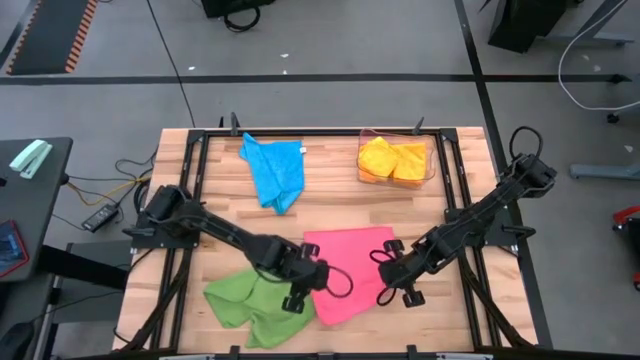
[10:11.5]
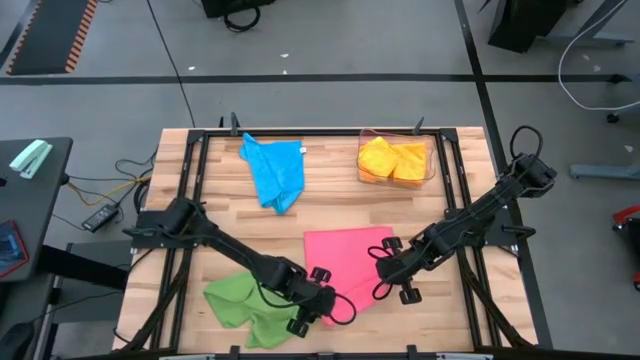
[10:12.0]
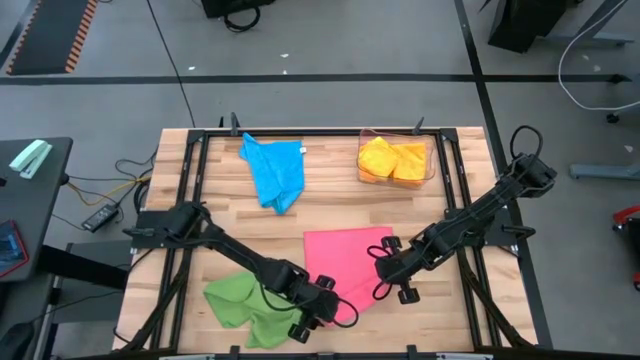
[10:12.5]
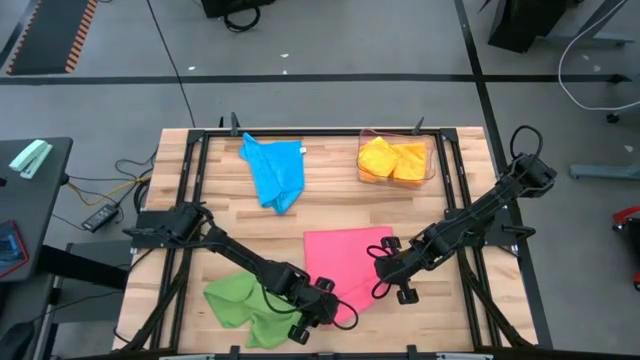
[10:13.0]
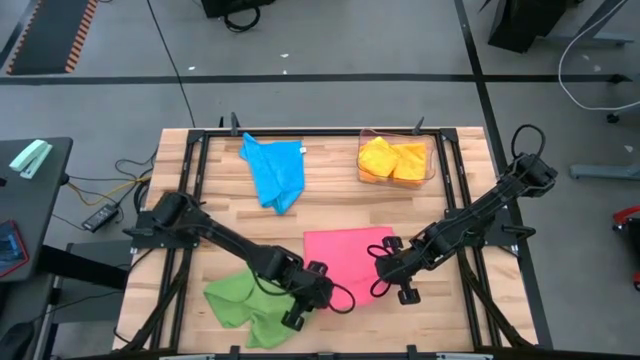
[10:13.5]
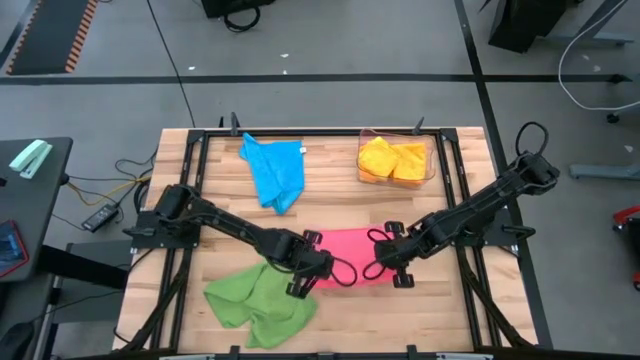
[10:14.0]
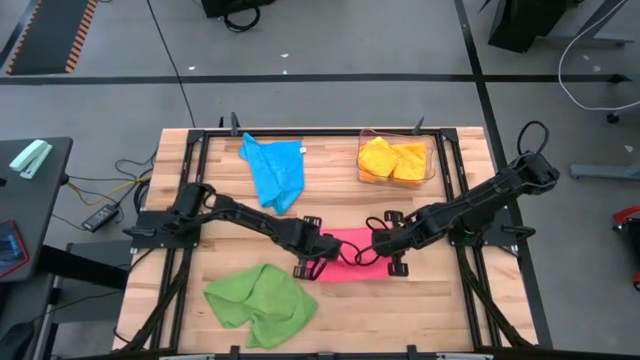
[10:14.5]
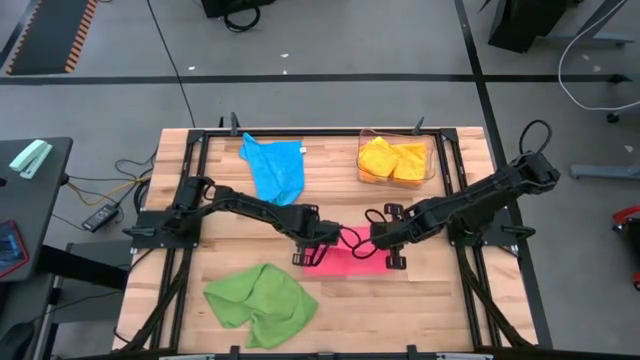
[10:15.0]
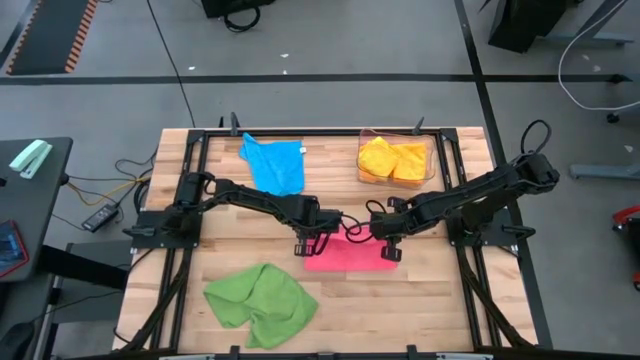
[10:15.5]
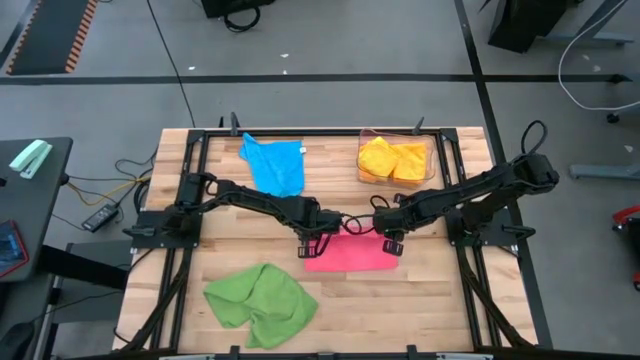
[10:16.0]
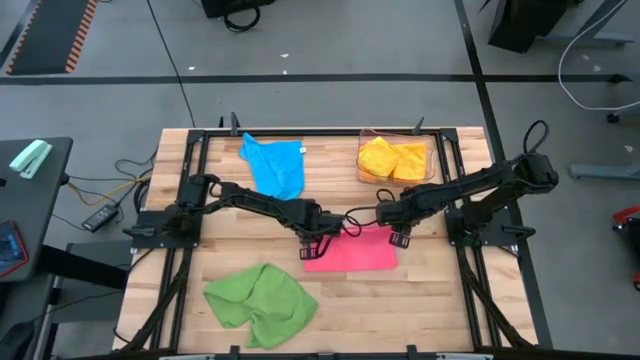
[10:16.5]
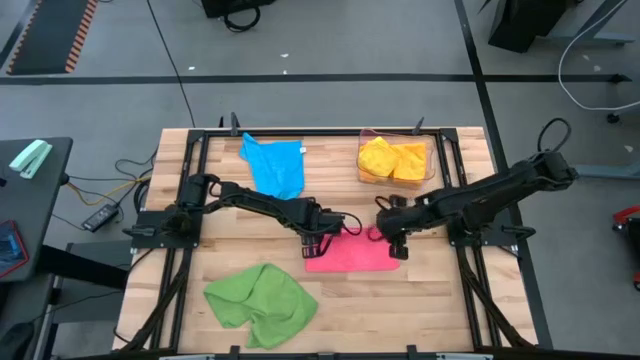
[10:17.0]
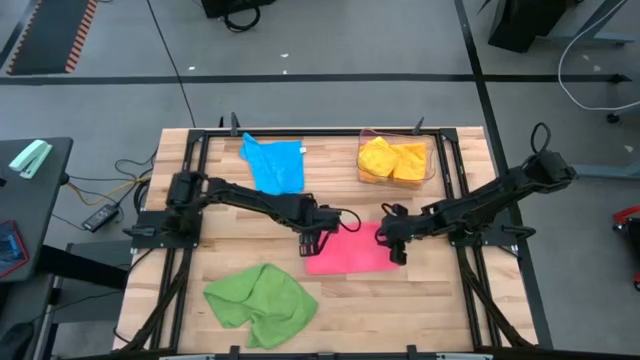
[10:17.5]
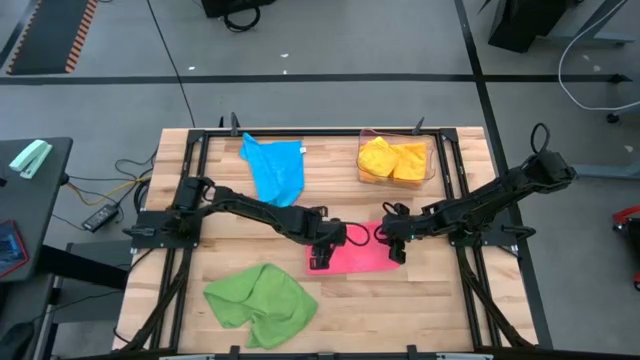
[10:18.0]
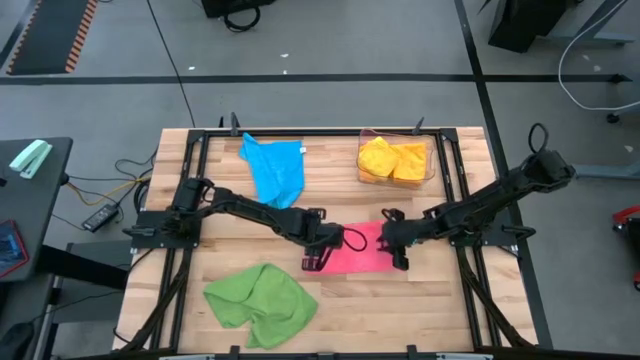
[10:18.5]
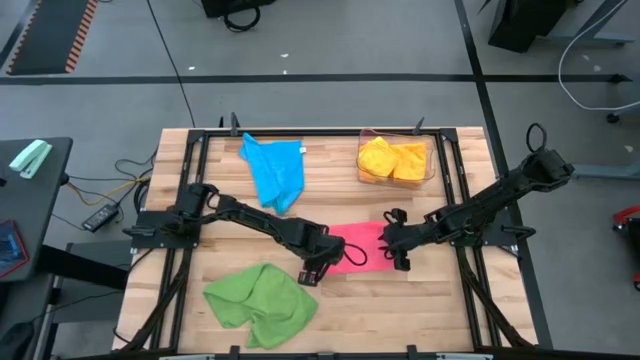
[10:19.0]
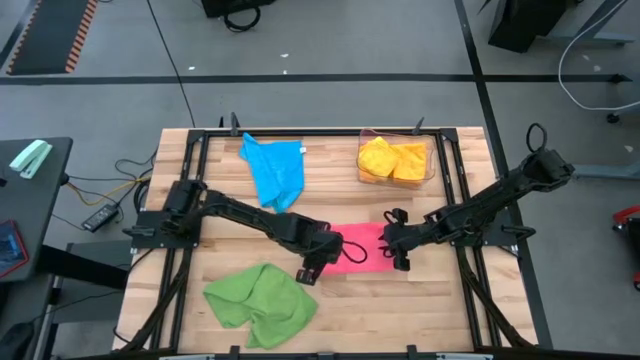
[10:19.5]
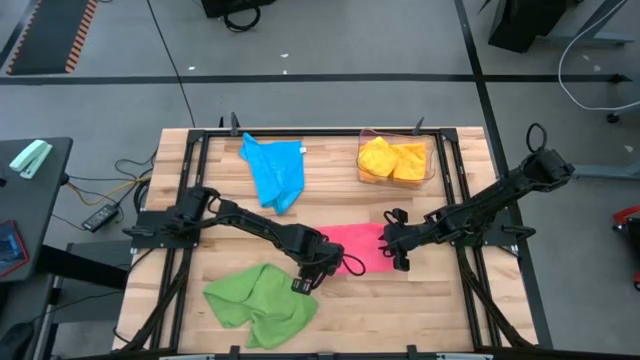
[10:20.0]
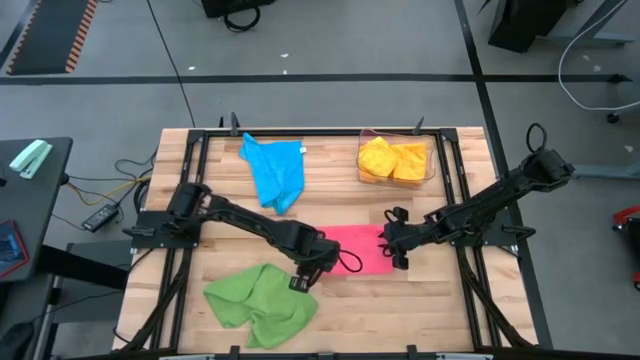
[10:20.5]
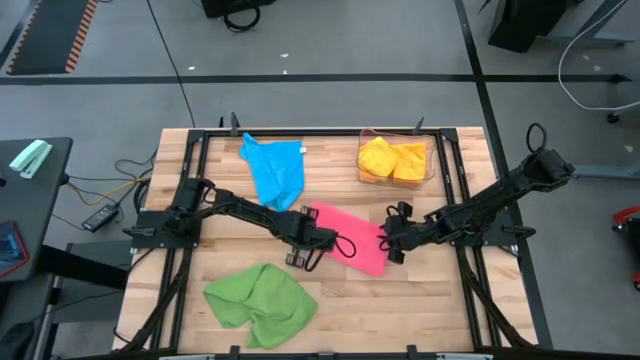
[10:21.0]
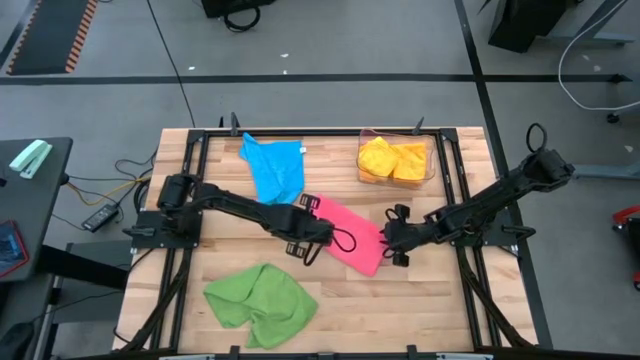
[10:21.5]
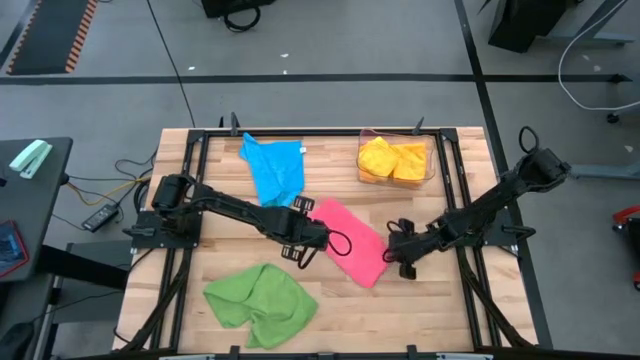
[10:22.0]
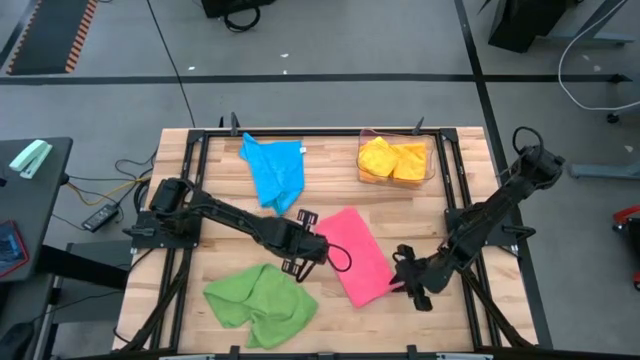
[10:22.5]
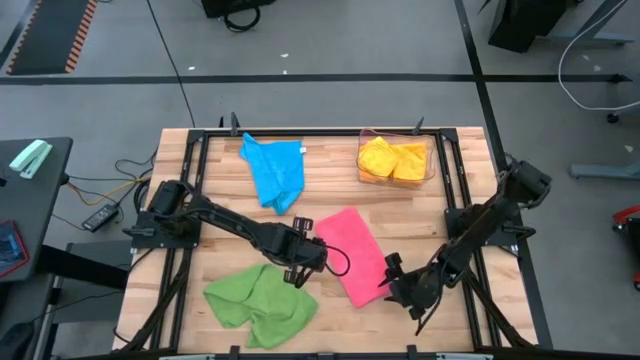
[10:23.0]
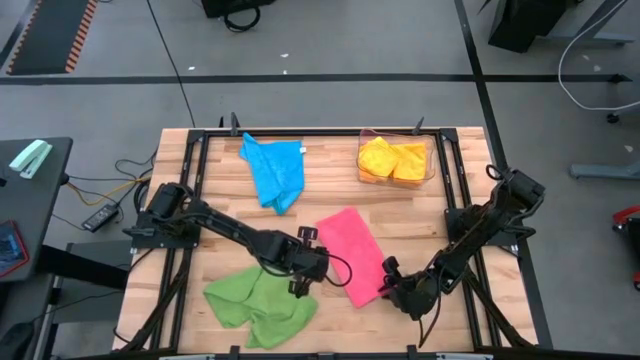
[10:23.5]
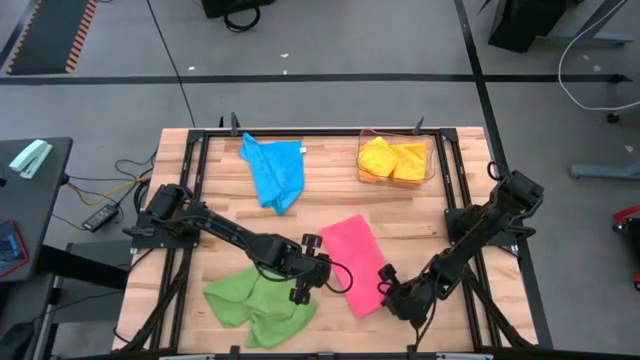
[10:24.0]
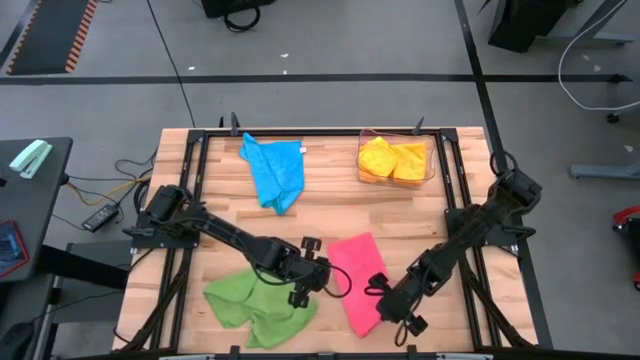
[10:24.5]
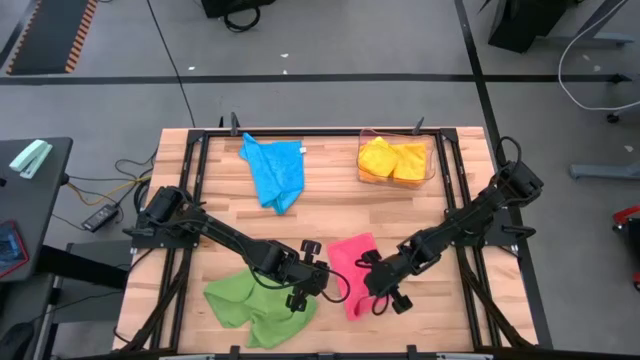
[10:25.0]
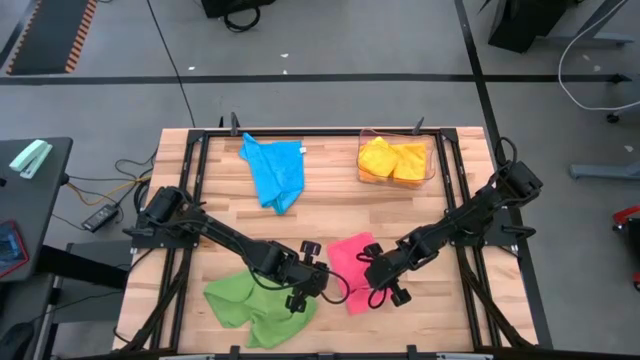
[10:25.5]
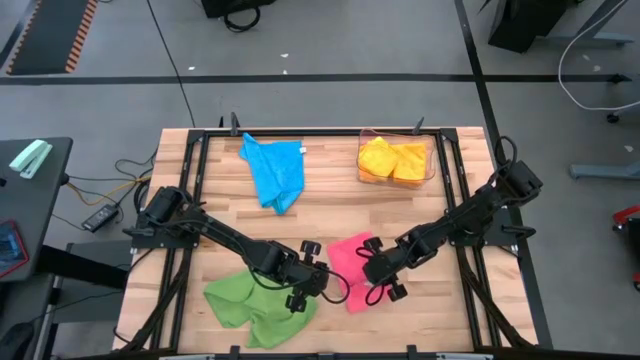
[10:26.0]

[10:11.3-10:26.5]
Task: Fold microfiber towels
Fold the pink microfiber cloth

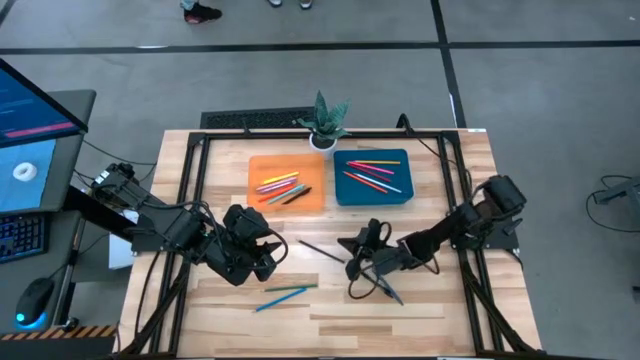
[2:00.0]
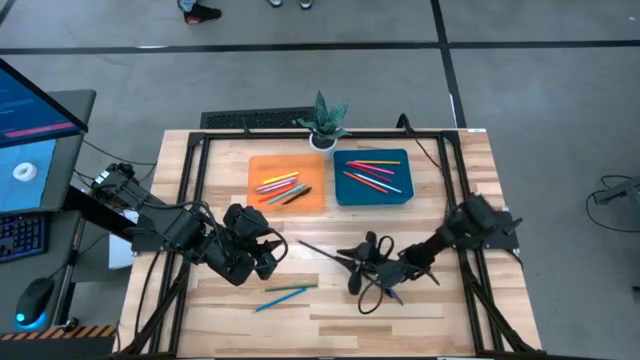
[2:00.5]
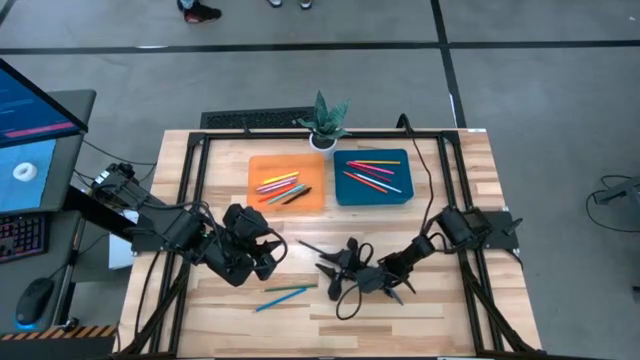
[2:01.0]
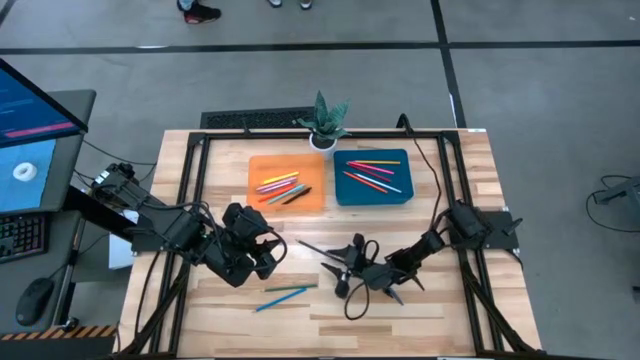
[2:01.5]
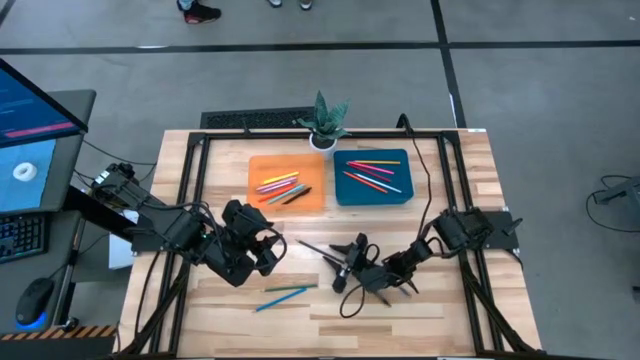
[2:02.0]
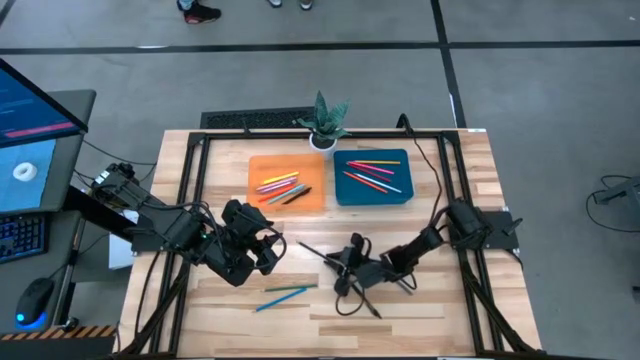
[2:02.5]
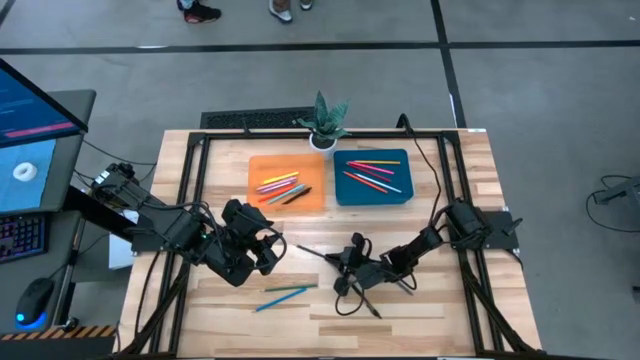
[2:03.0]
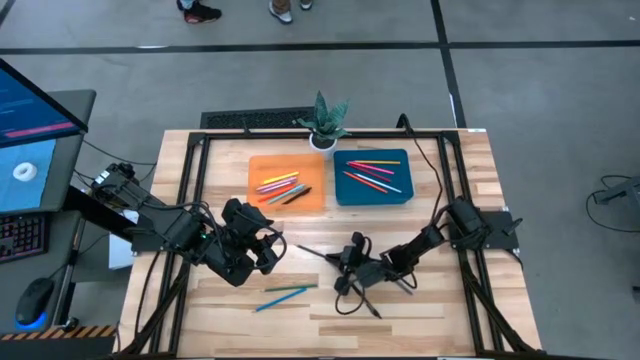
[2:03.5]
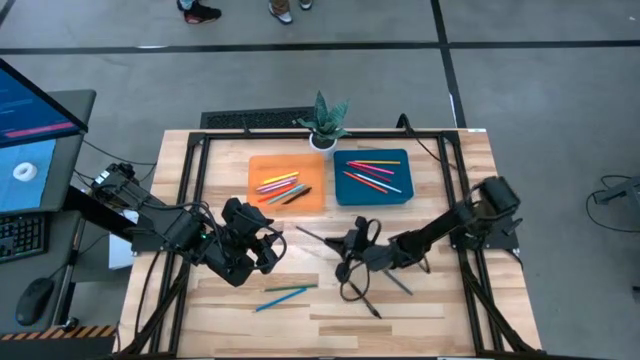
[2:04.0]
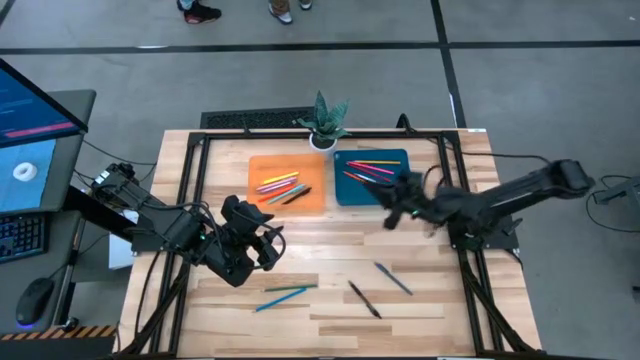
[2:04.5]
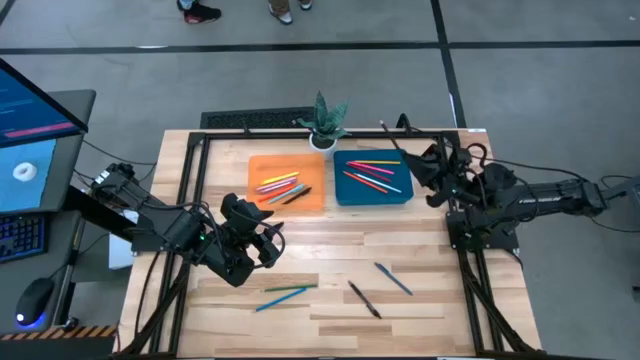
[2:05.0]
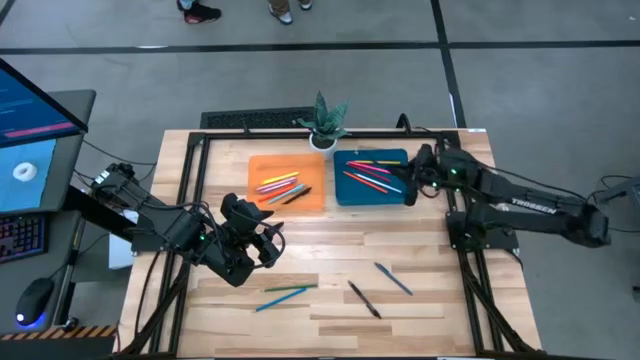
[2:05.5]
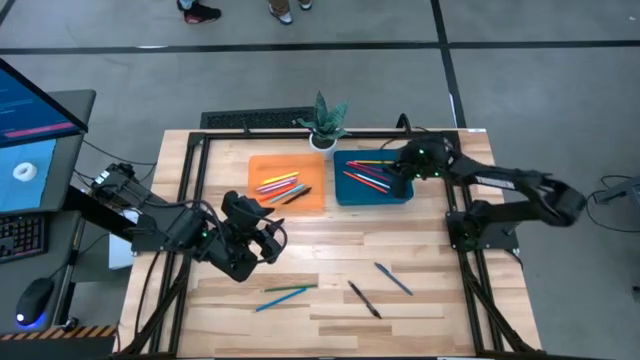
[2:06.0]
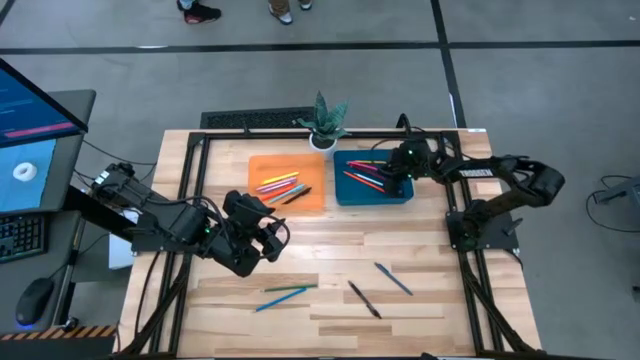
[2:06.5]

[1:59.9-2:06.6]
Task: Sort pens & pencils
Put the black pencil into the blue bin
